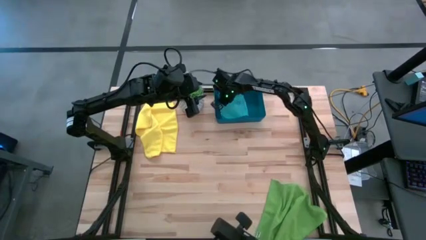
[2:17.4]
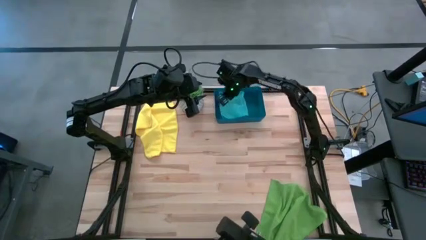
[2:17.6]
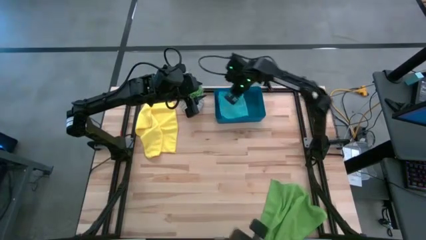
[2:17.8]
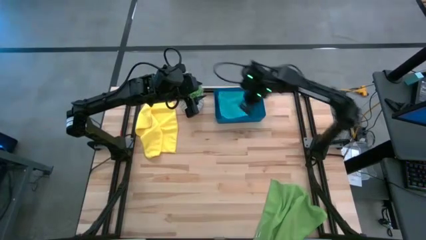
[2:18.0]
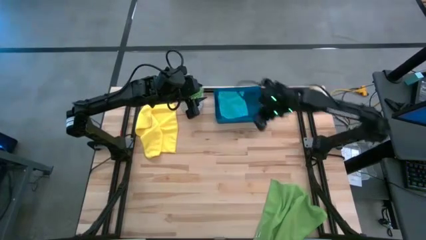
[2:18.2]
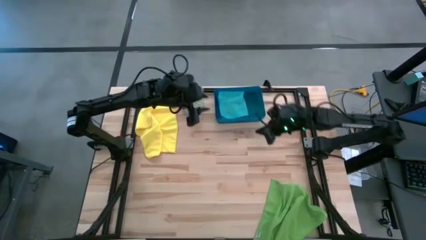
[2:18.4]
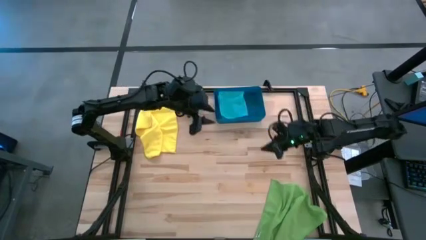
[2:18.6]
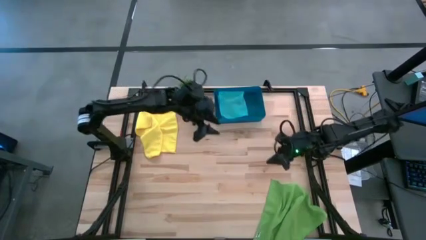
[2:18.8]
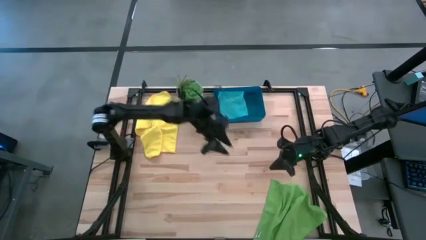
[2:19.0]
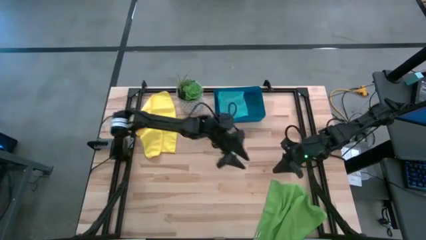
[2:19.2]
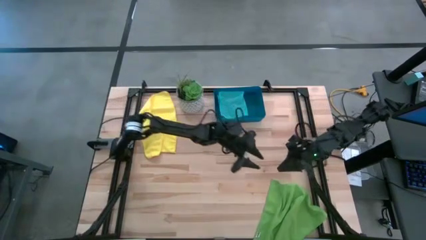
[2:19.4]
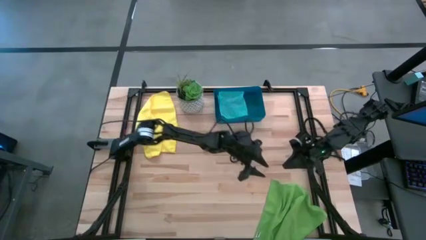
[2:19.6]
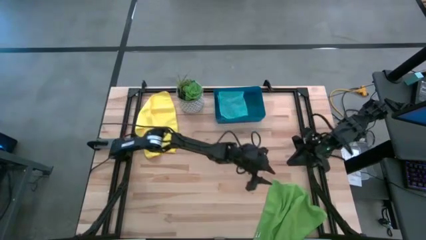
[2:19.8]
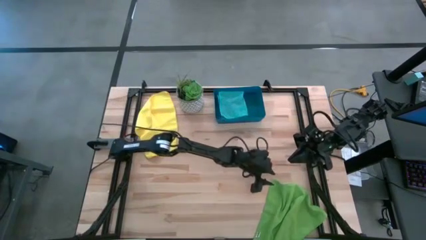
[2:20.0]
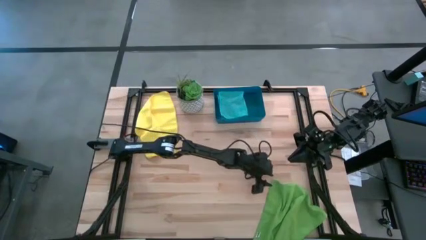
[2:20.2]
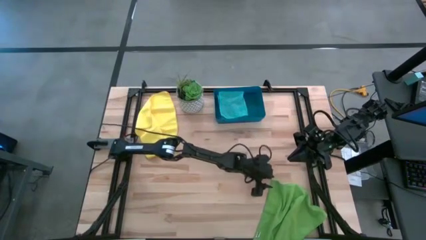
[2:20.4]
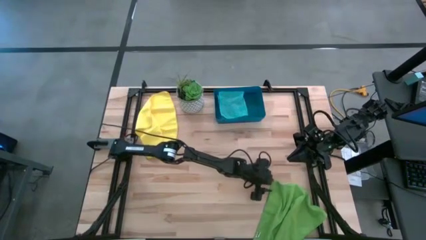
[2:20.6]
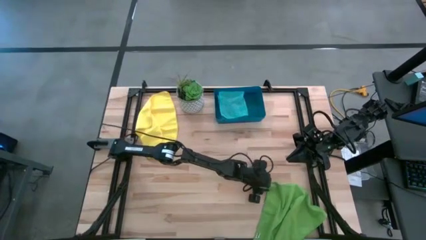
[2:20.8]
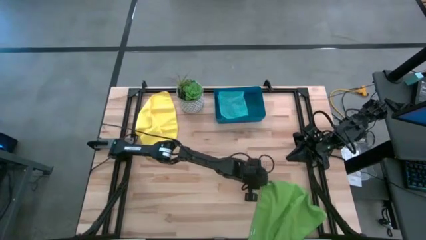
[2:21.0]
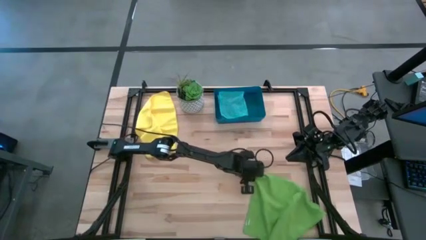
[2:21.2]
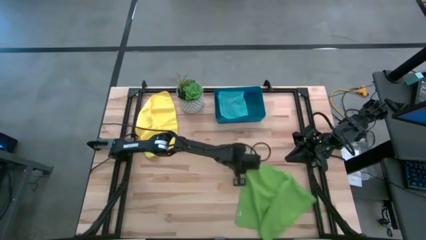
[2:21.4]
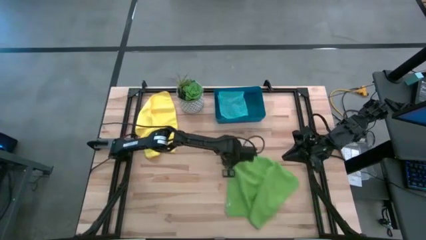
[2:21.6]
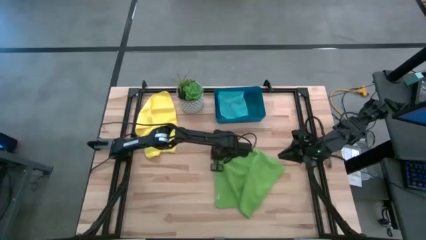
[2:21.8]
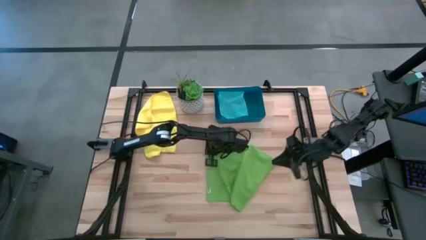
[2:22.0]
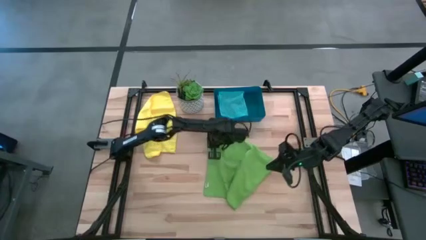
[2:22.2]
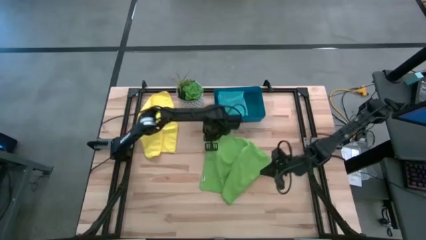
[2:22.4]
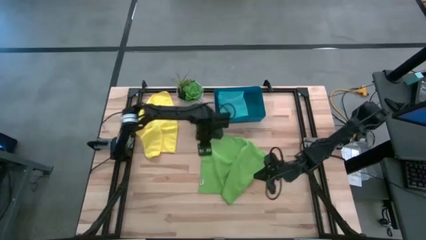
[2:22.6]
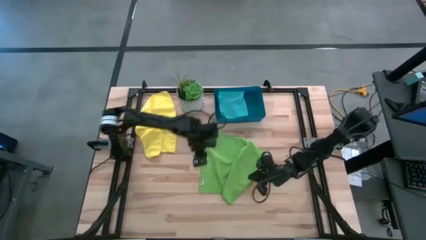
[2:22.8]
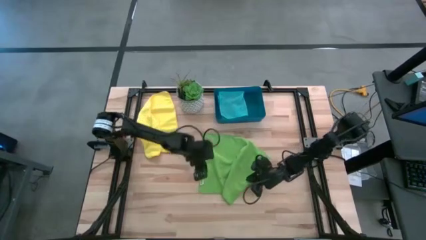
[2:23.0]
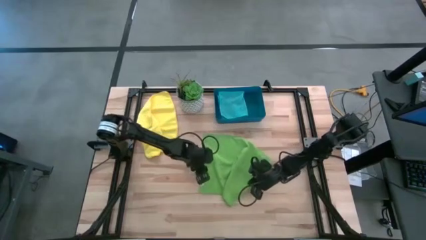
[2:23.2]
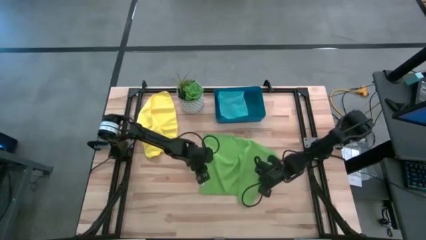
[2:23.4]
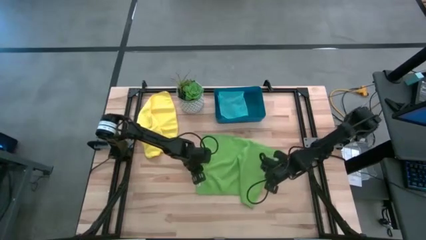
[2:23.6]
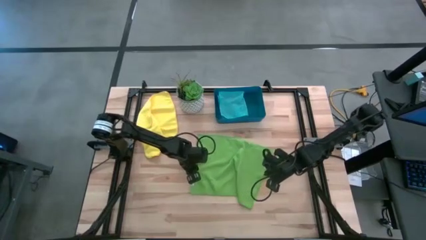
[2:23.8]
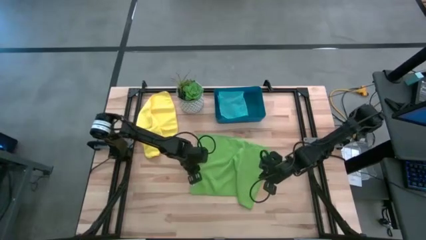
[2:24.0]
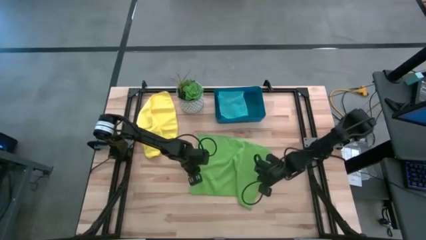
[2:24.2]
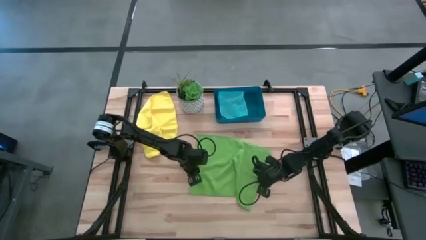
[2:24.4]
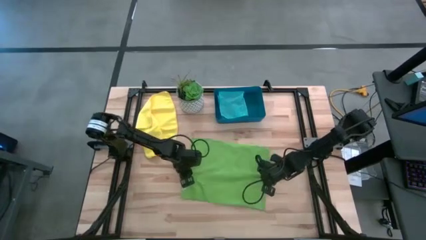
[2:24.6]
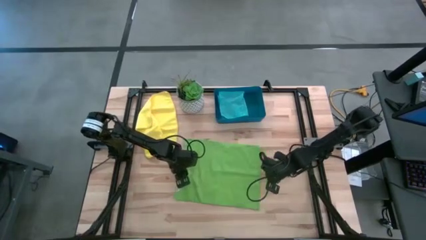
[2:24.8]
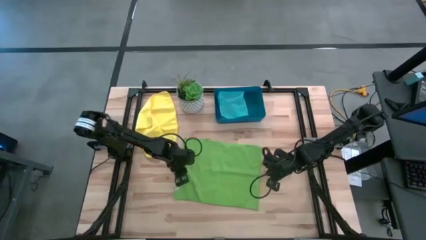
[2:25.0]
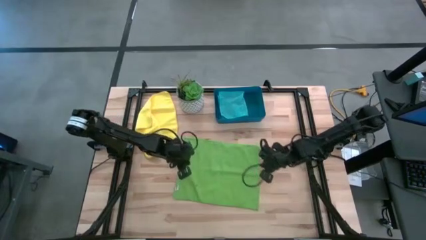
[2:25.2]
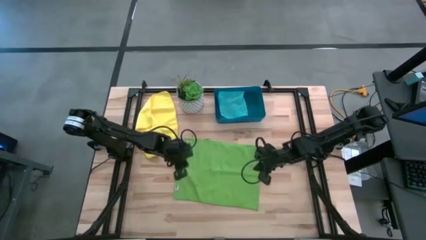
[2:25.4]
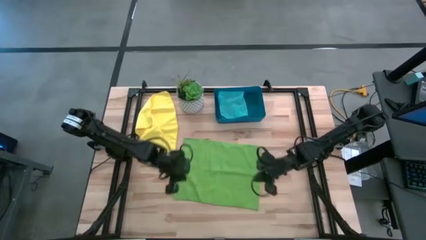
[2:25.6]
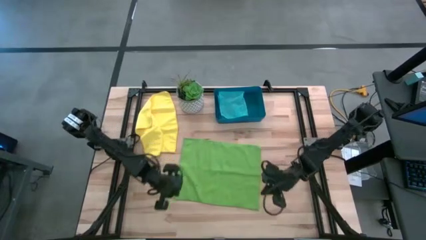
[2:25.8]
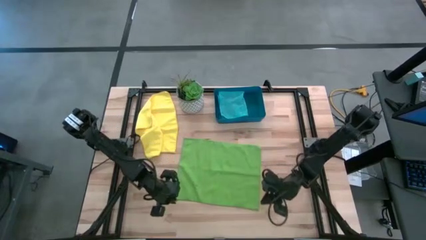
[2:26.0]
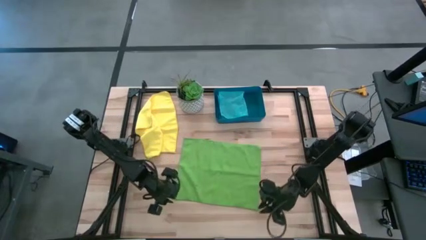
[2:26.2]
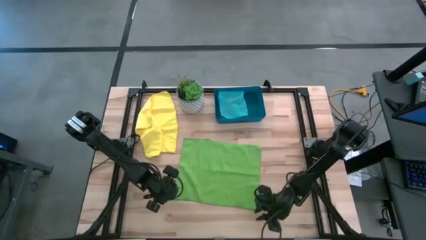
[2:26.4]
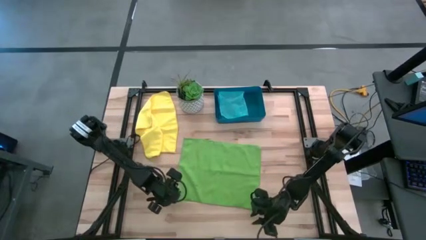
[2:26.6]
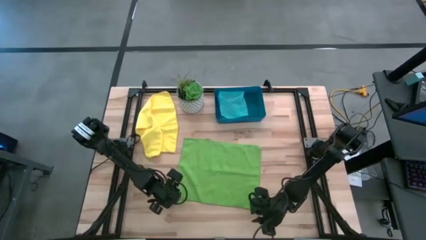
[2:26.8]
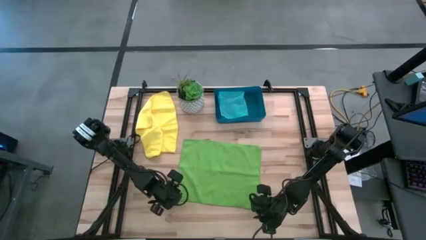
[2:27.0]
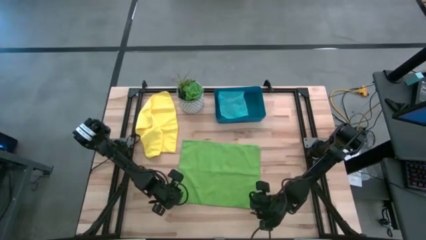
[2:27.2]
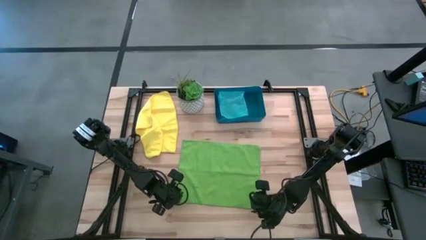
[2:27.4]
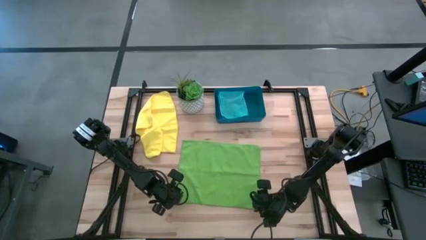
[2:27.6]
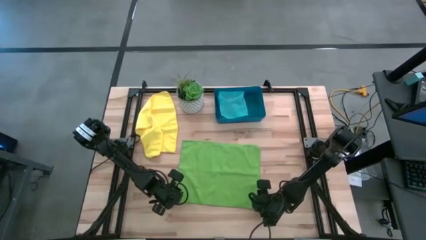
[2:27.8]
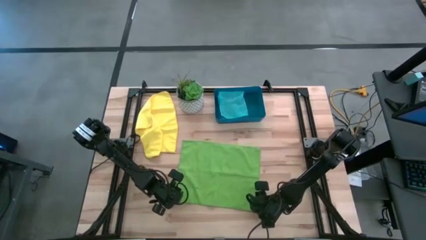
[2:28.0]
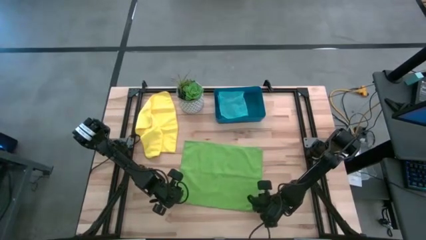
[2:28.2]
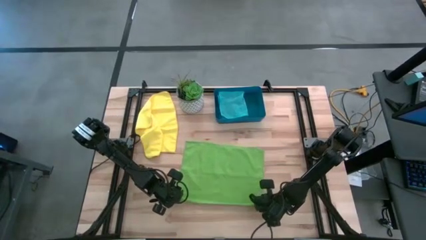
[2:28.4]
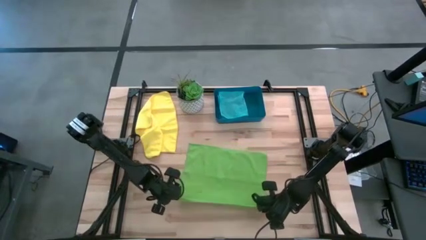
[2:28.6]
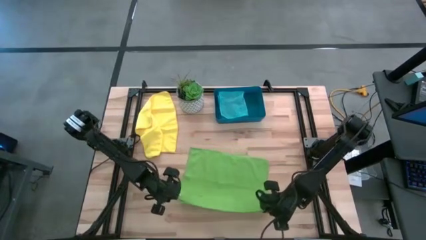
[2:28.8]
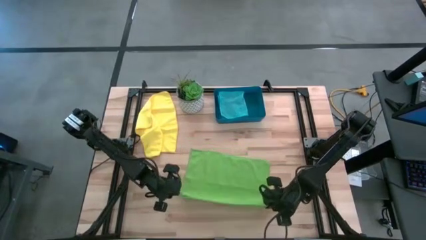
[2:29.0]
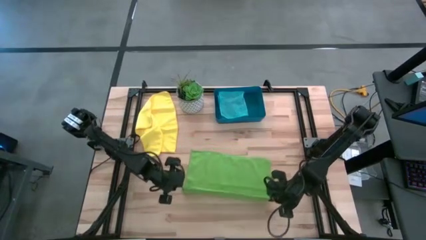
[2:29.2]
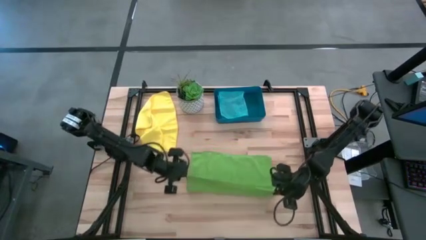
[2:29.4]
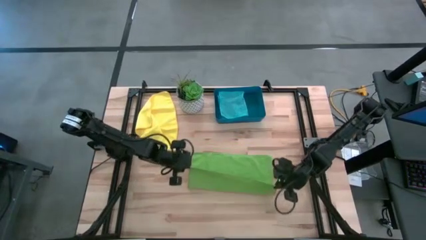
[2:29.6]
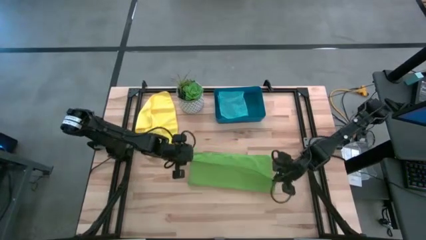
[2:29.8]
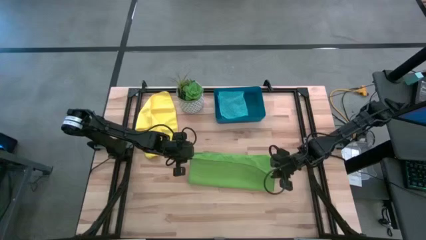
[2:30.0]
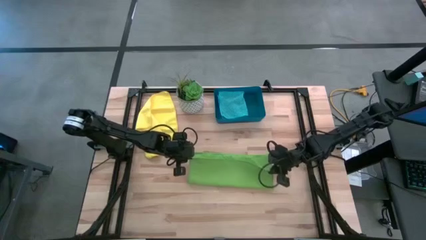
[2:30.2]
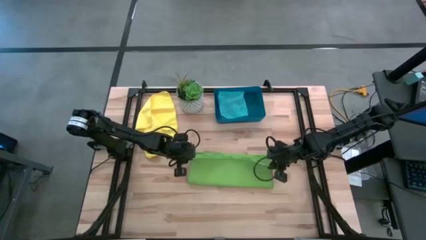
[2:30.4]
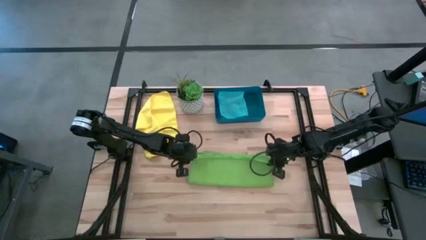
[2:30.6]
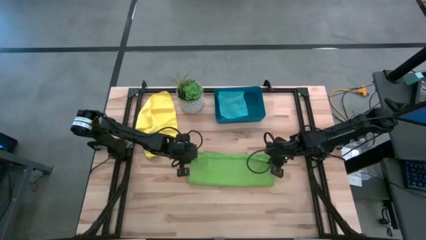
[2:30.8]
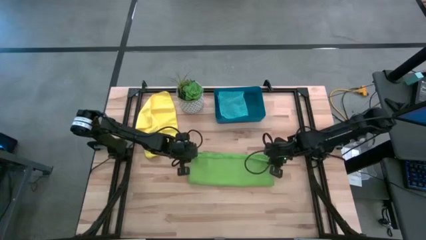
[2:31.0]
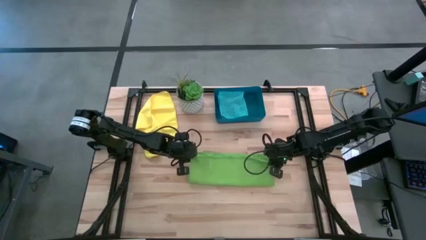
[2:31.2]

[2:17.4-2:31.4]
Task: Fold microfiber towels
Fold the green microfiber towel on top of the light blue microfiber towel into the dark blue bin
